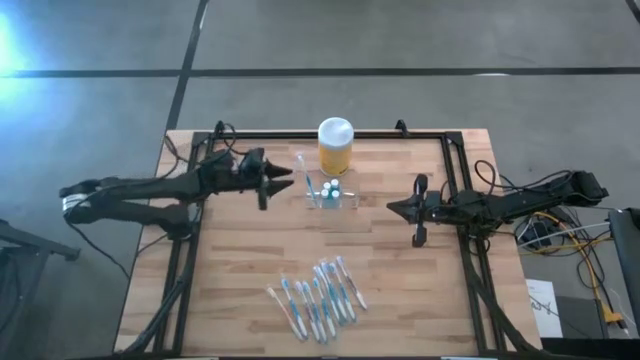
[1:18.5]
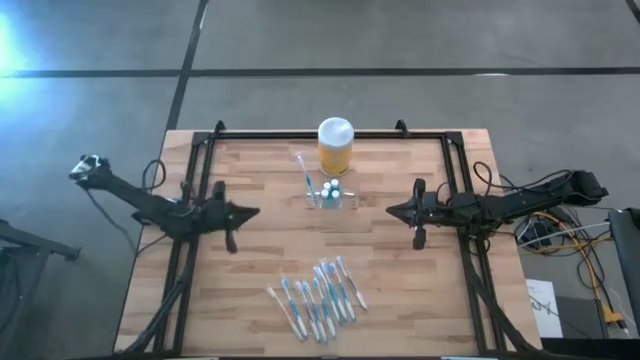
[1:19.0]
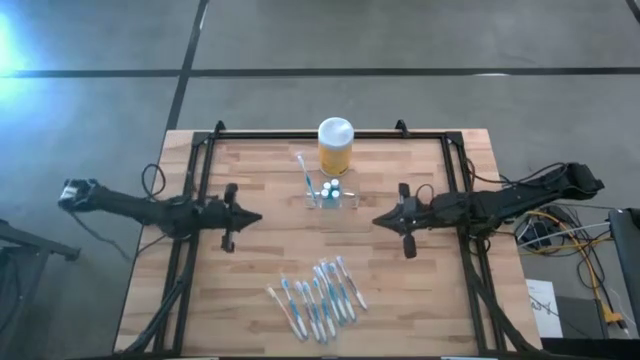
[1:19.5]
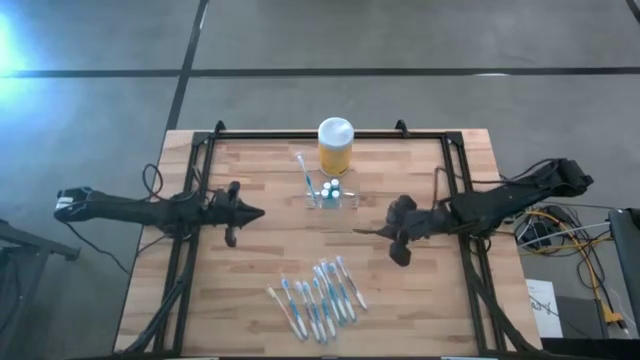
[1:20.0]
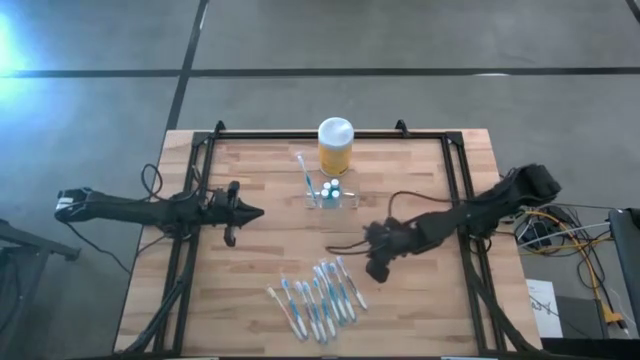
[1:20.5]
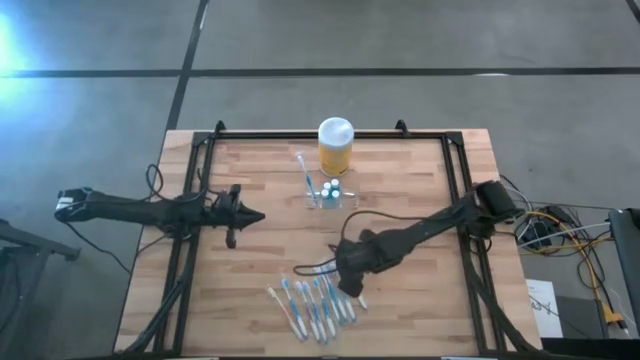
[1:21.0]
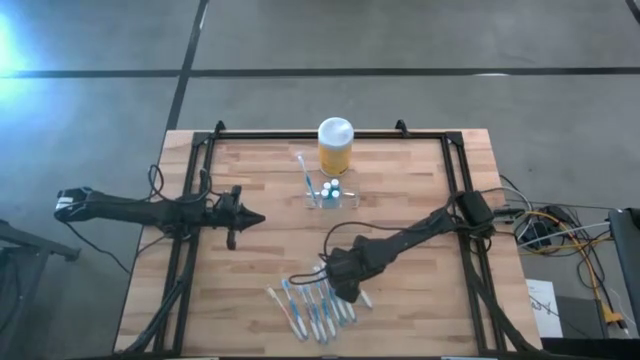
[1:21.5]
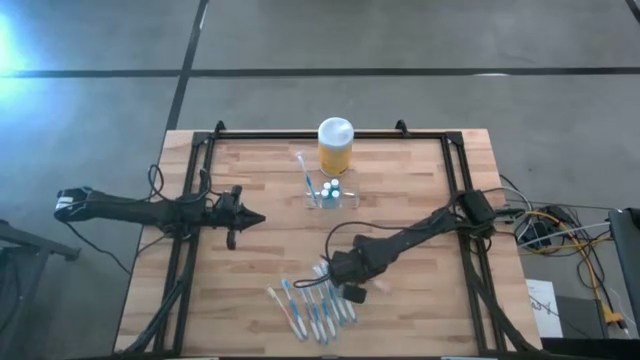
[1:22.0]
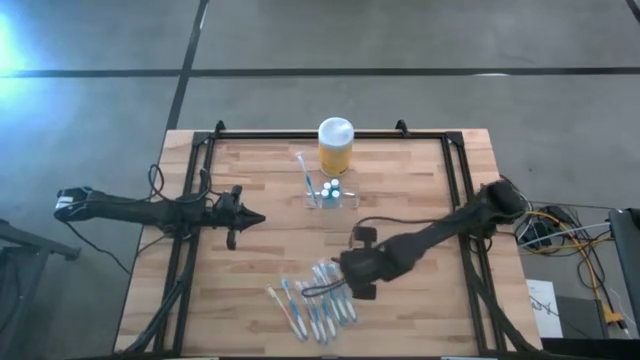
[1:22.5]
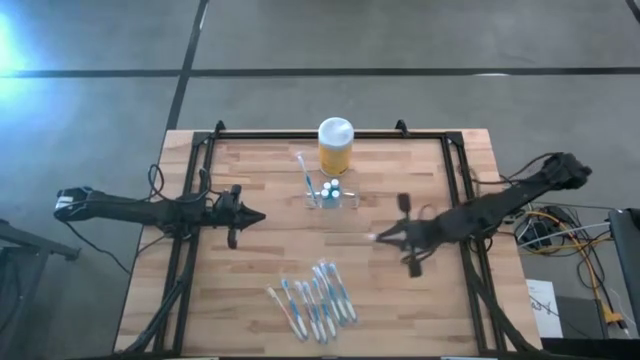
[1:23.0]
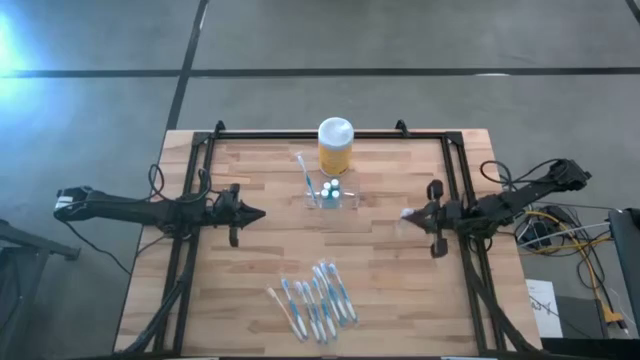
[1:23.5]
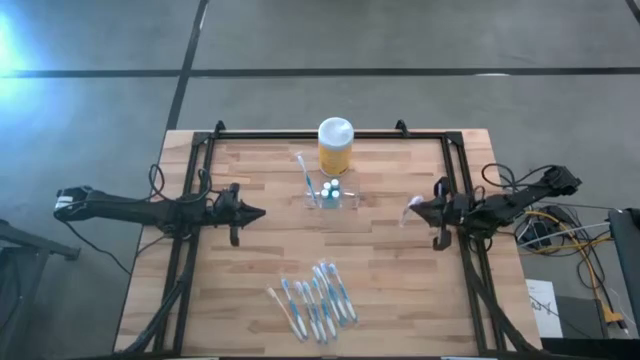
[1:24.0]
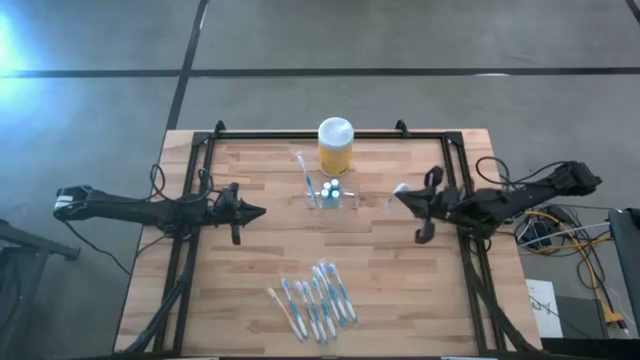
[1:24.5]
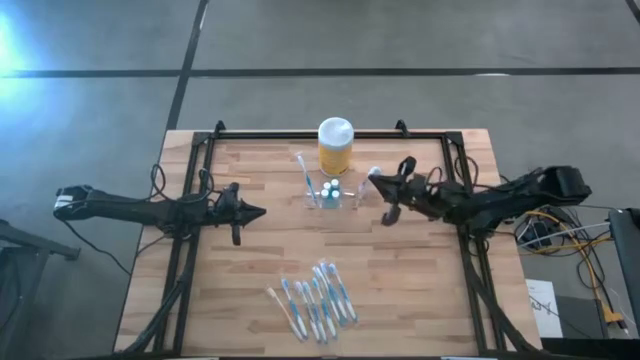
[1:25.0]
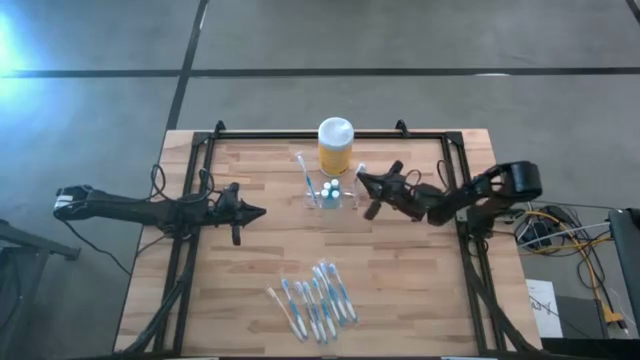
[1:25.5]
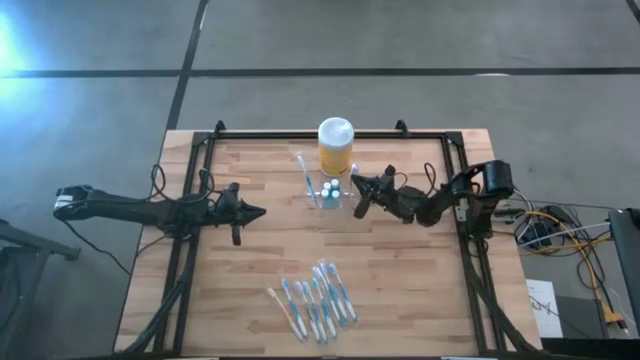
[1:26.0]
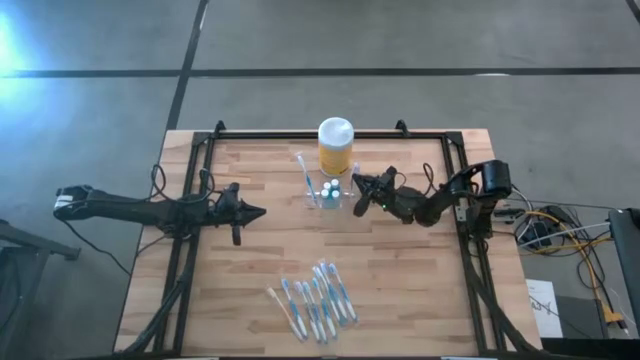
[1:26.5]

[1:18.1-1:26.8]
Task: Pick & Place toothbrushing station
Put the violet toothbrush into the transparent organizer

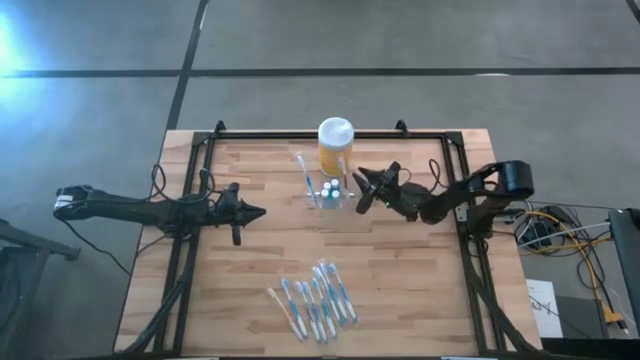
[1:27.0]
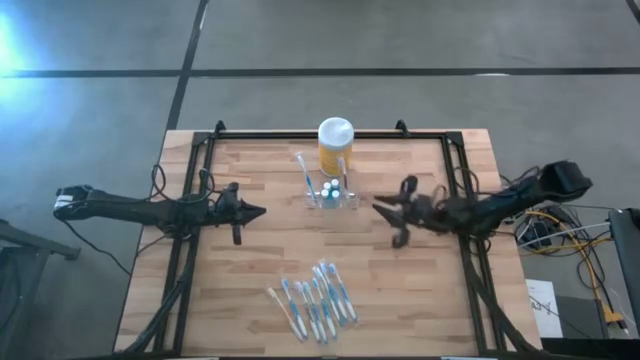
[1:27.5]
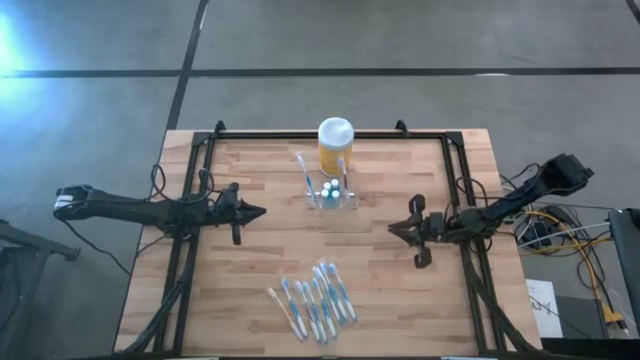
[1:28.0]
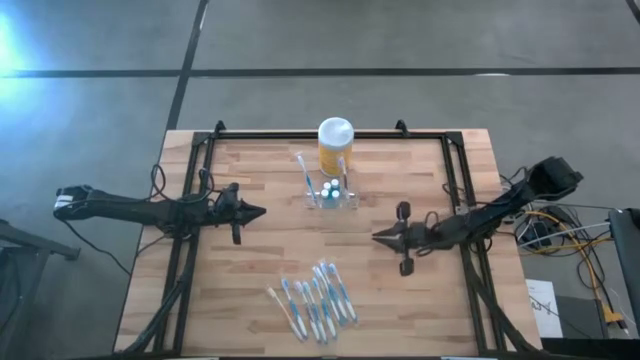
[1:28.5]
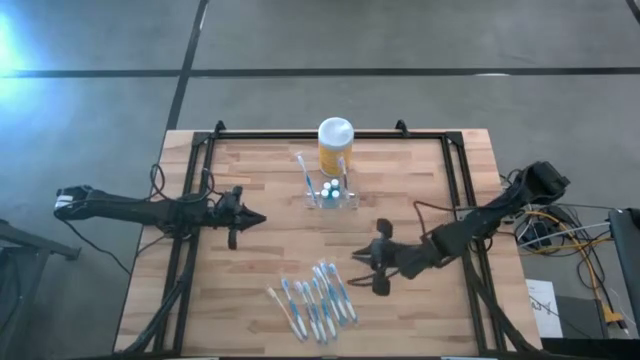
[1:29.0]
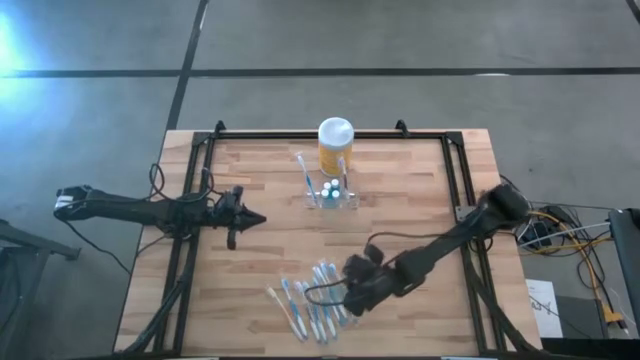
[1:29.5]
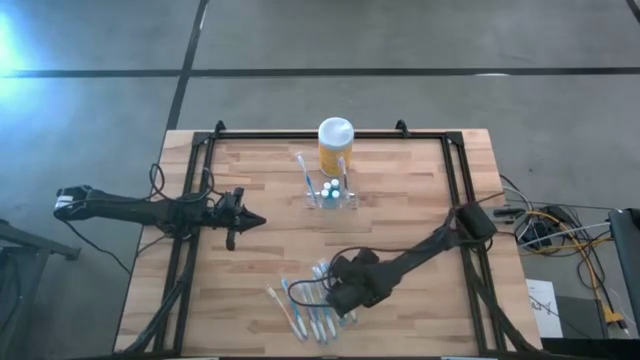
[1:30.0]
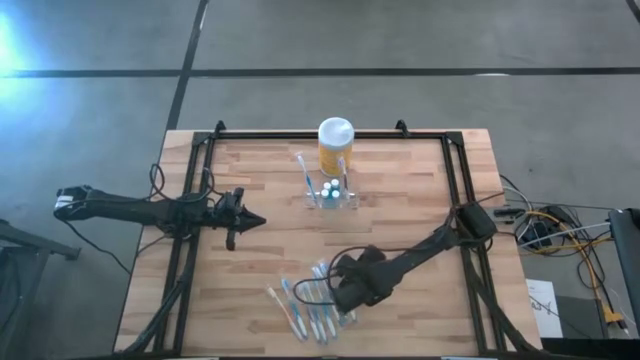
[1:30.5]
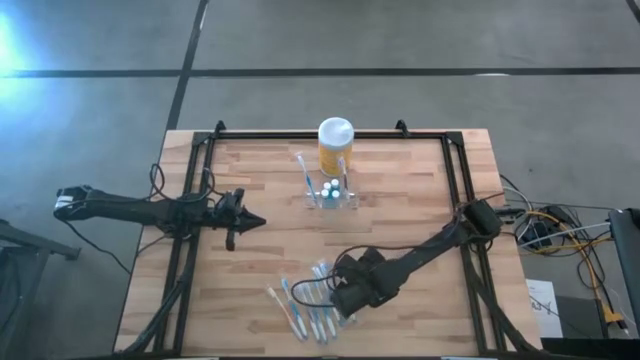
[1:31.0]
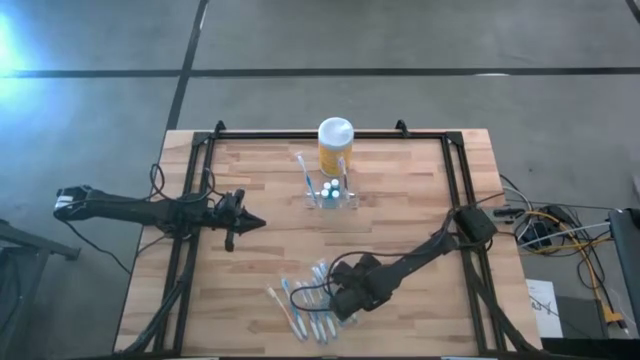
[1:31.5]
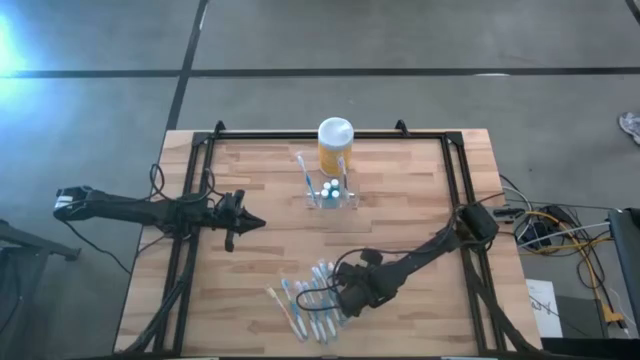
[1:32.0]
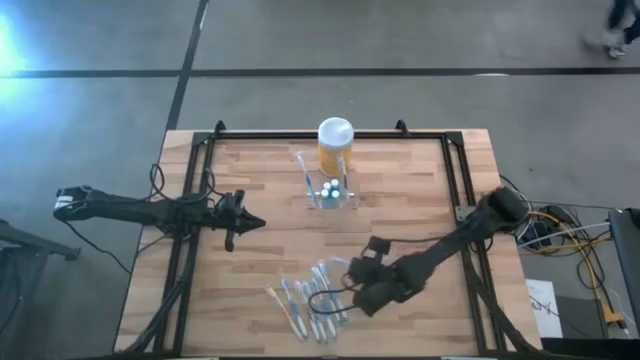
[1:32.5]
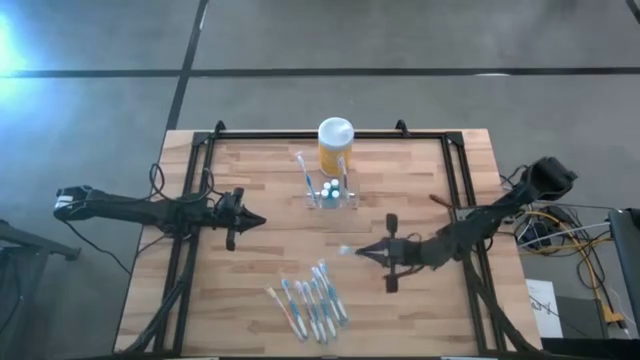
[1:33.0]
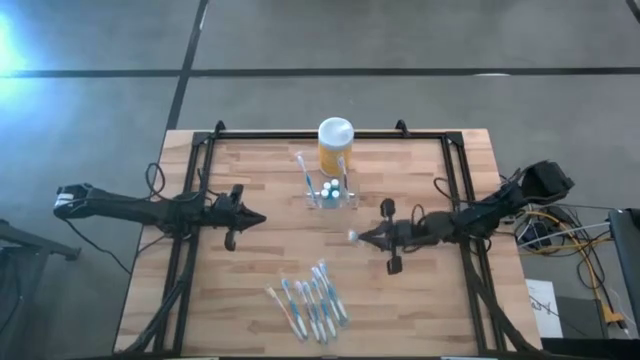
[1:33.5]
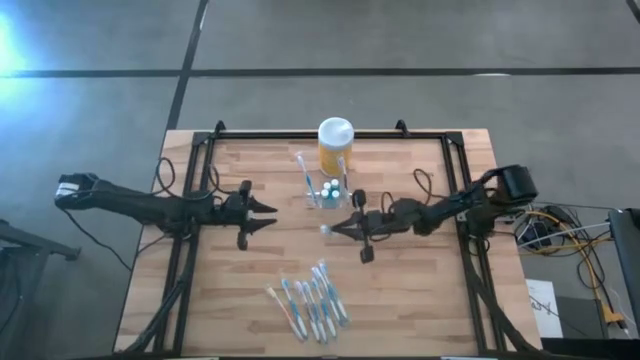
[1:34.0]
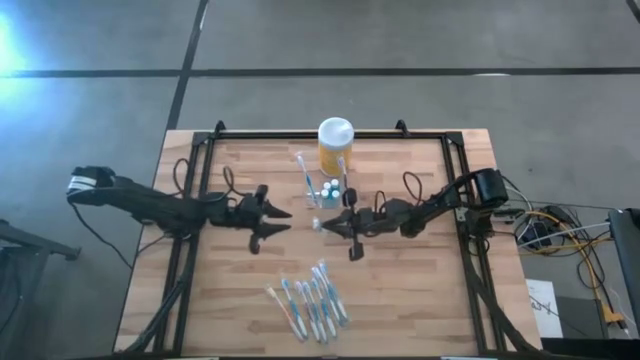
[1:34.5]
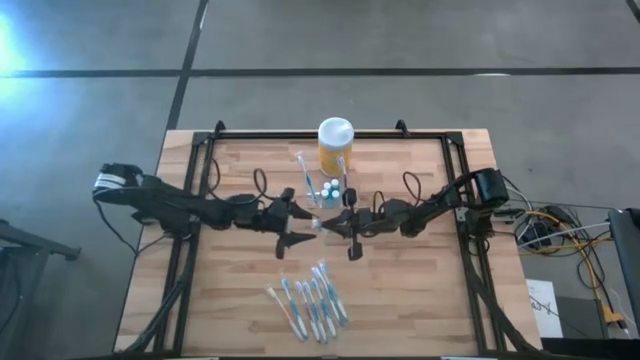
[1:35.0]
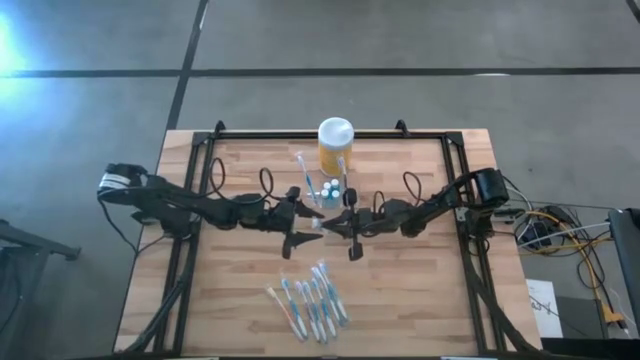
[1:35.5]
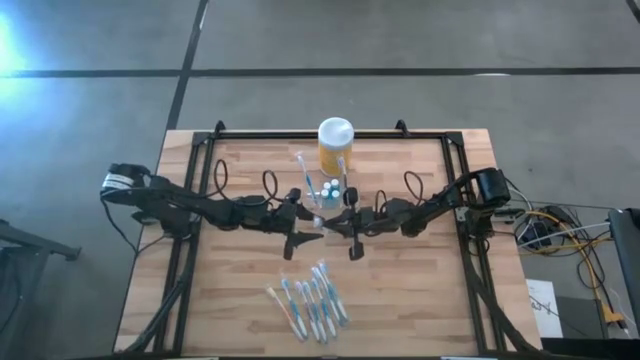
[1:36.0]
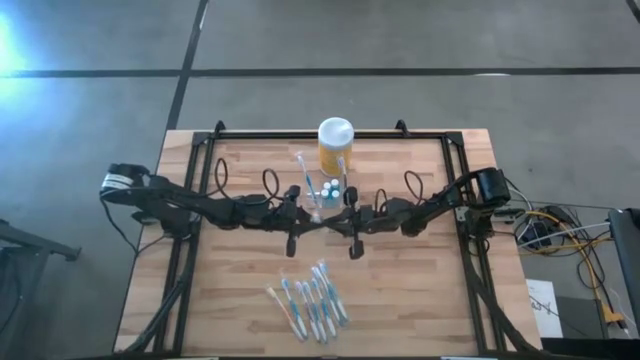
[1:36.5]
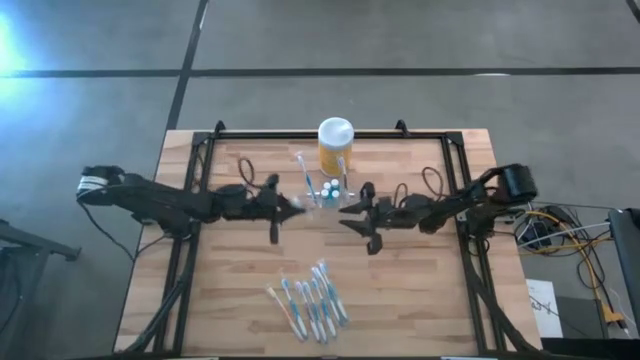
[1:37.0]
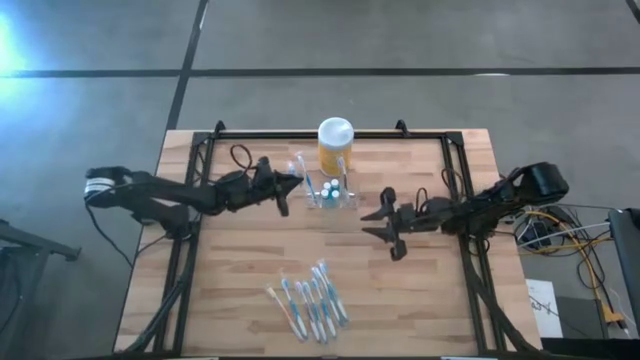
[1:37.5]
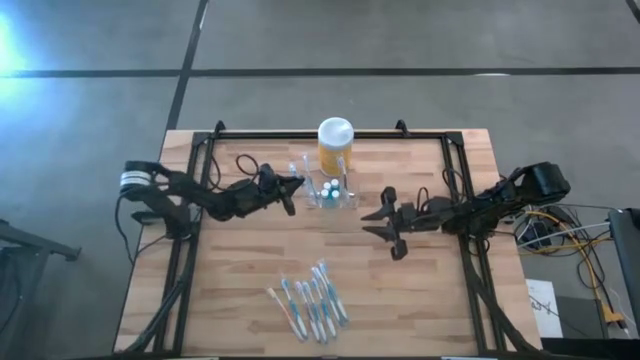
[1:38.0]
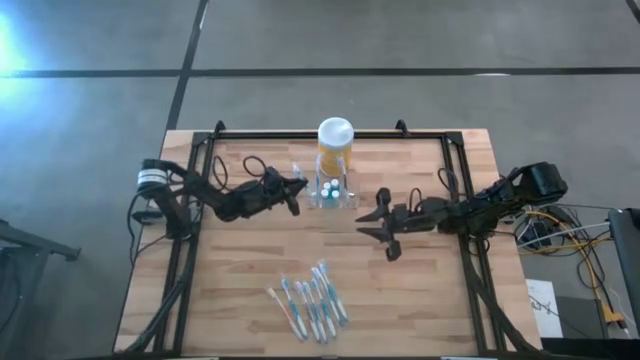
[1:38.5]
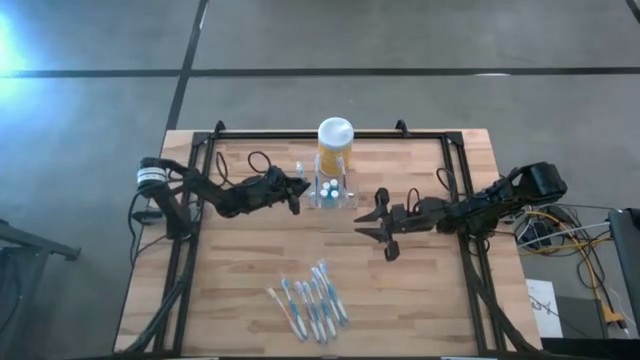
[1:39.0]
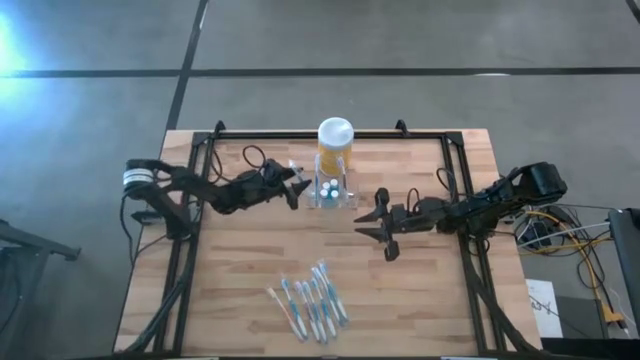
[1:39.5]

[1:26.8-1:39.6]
Put the blue toothbrush into the transparent organizer

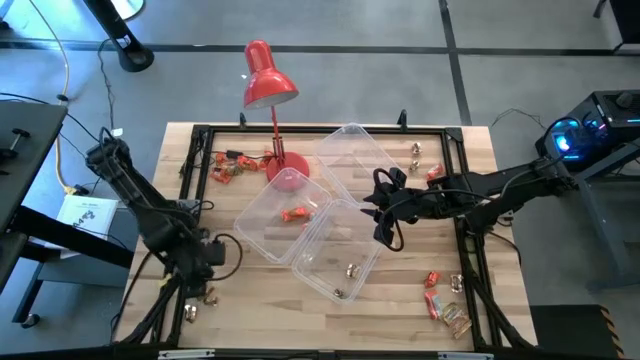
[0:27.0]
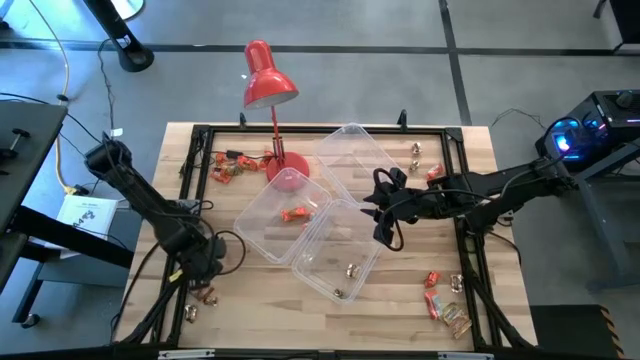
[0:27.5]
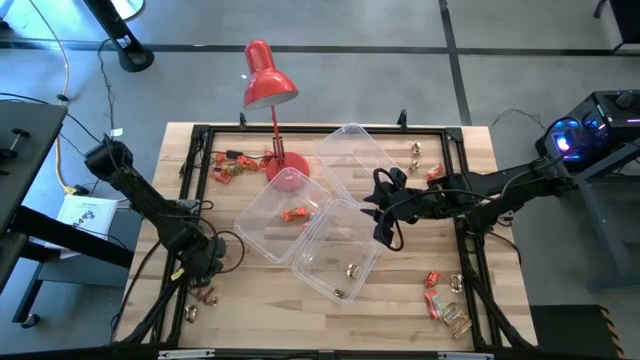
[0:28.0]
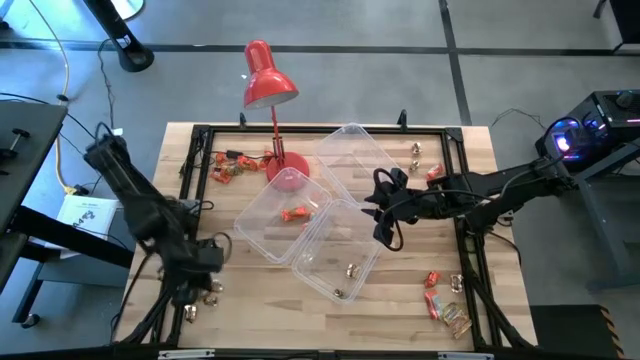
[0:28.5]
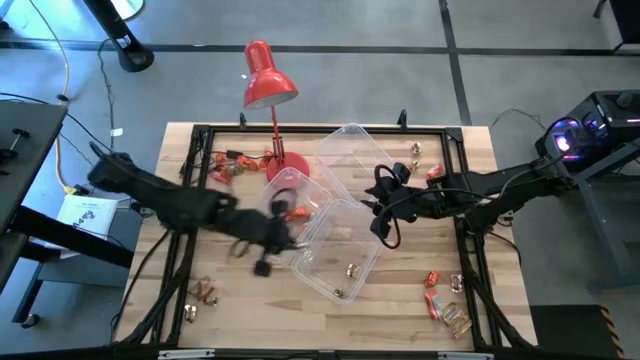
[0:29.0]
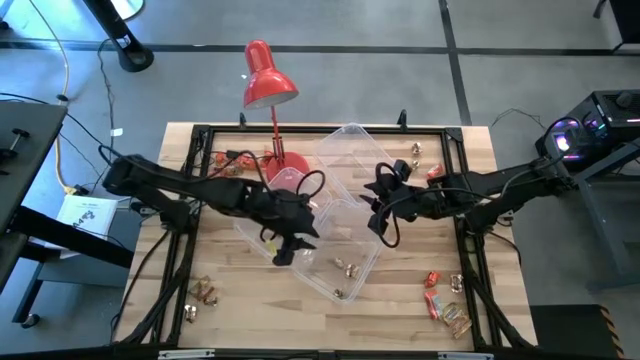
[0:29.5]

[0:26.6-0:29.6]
Task: Sort candy
Put the gold candy into the bottom left transparent bin
